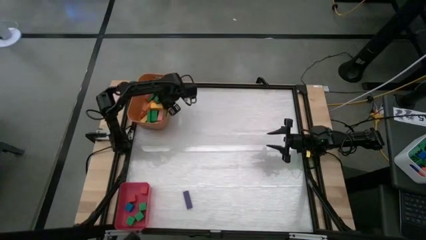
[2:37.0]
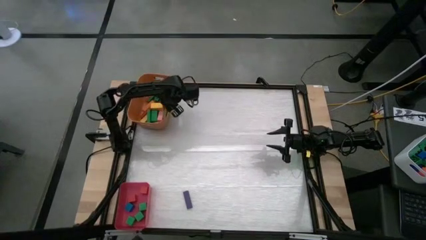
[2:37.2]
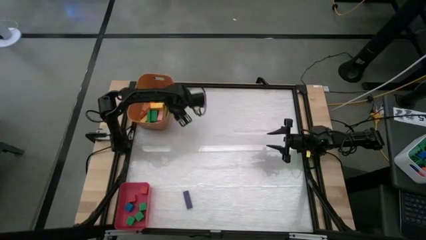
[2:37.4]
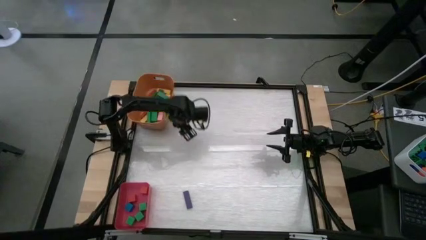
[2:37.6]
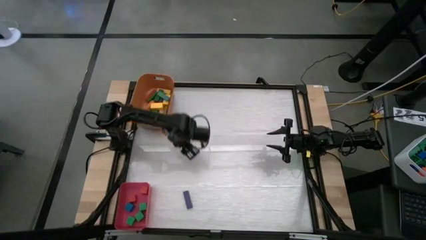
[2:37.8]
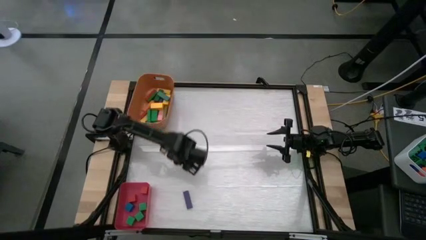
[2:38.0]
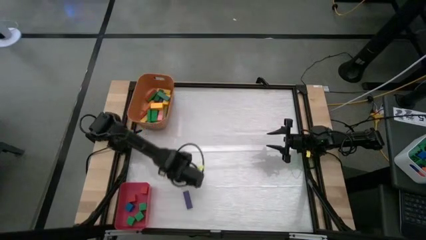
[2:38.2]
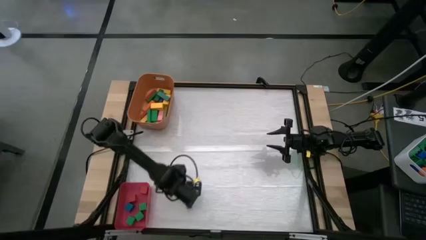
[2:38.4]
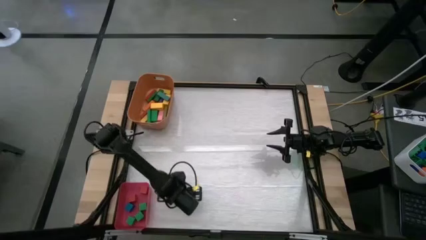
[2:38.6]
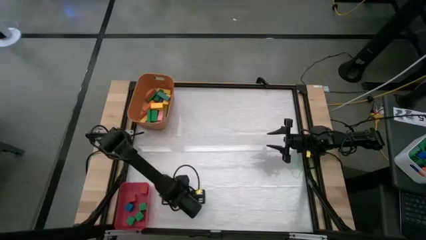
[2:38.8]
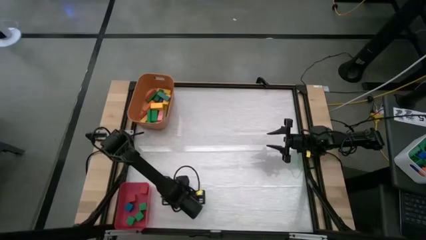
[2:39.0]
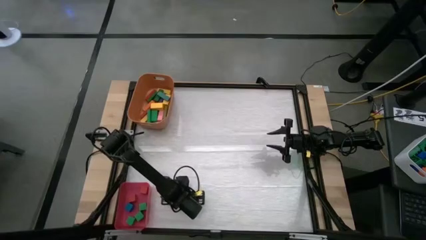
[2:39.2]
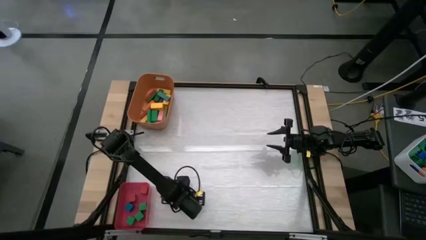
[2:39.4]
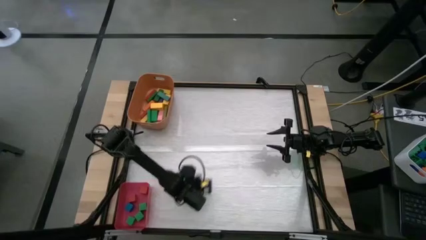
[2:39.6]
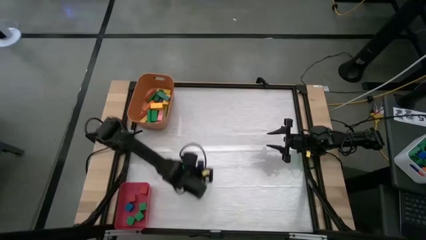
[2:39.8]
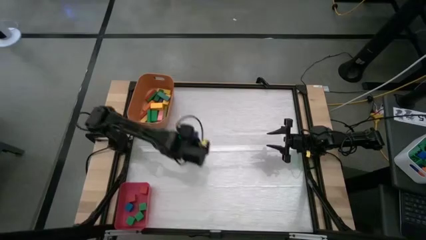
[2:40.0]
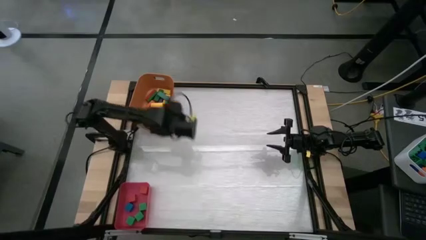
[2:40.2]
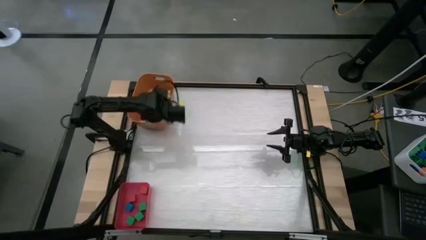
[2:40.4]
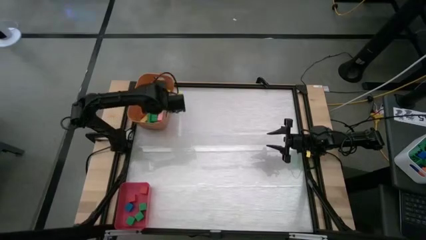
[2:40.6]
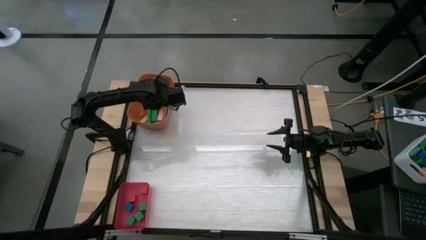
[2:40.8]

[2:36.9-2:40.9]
Task: Sort blocks by size
Put the purple block into the orange bin

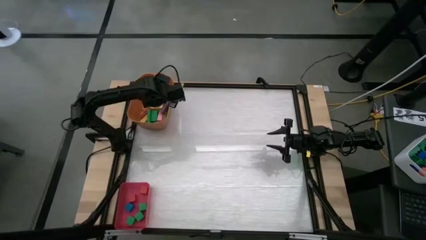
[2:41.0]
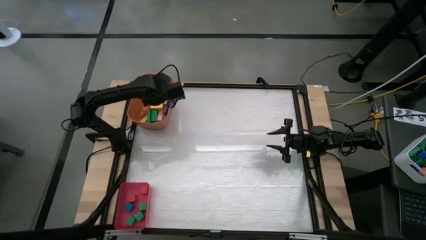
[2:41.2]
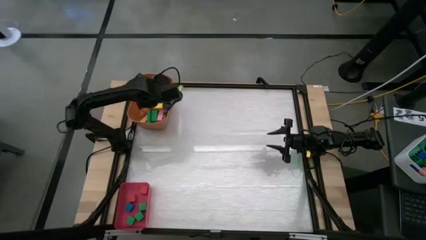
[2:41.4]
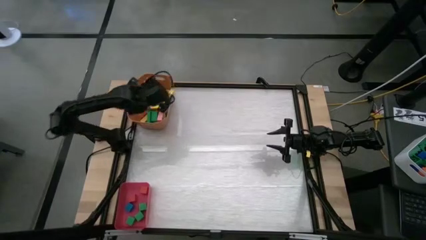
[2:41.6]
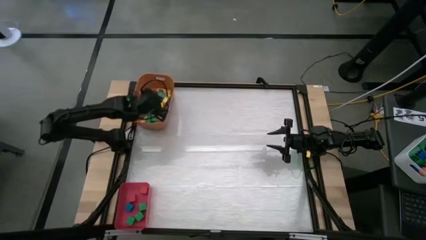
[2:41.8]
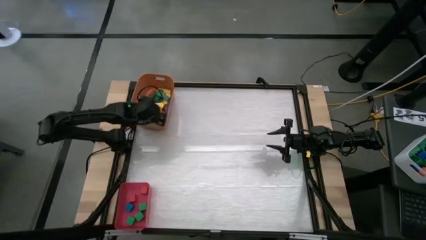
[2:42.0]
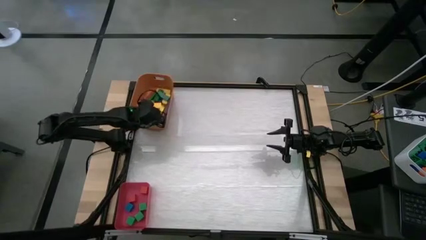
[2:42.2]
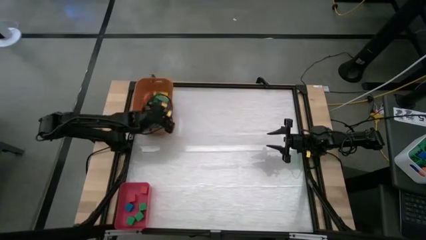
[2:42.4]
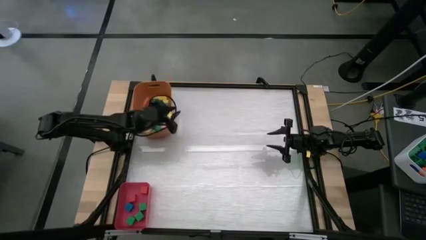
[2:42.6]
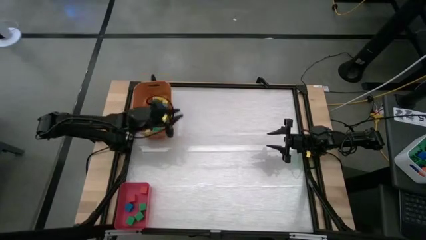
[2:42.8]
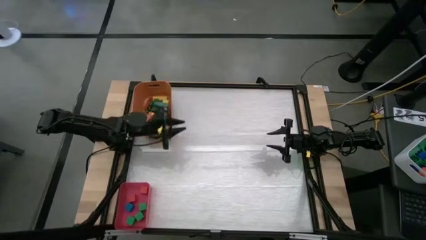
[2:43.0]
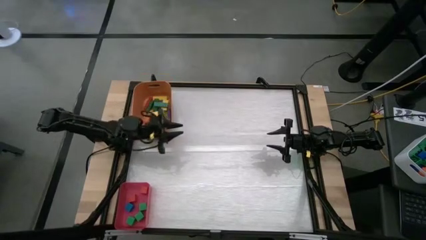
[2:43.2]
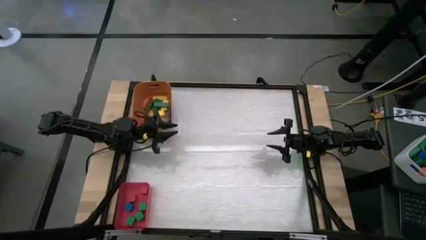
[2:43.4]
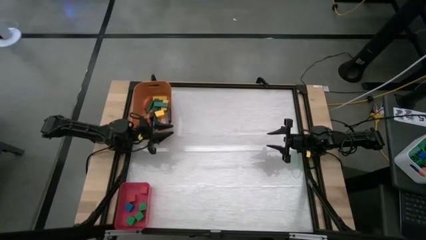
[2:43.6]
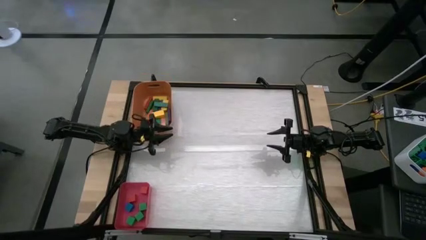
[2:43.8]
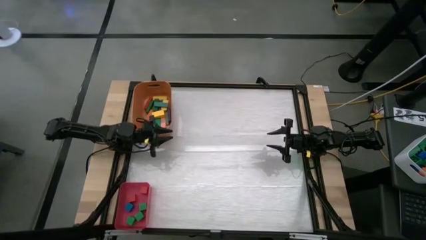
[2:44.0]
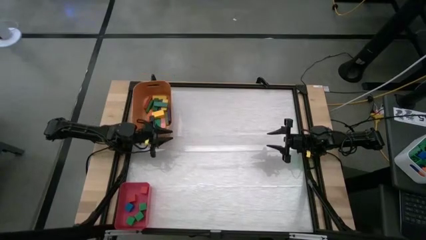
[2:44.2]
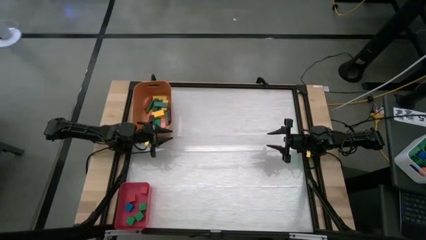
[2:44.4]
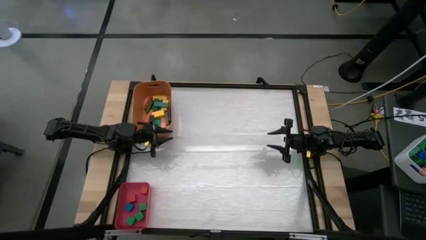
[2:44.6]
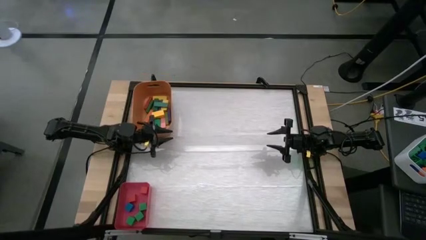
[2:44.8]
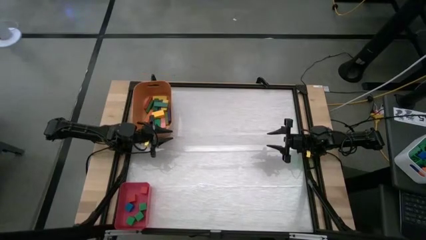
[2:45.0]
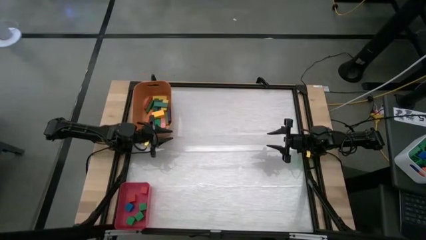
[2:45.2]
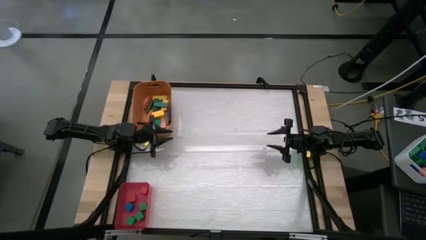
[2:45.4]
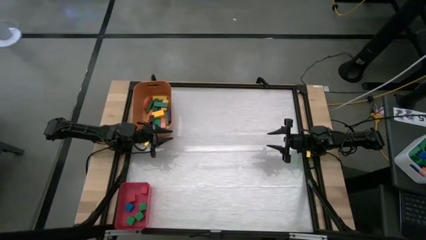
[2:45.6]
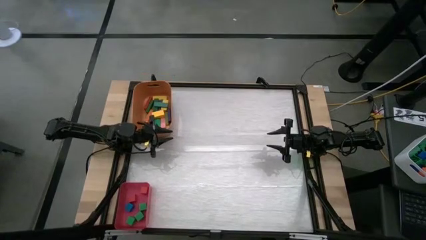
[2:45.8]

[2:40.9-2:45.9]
Return to Home Position

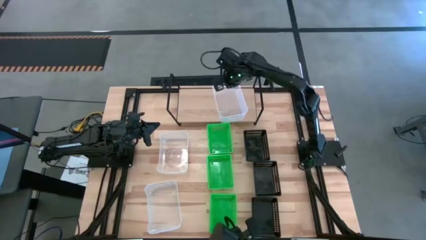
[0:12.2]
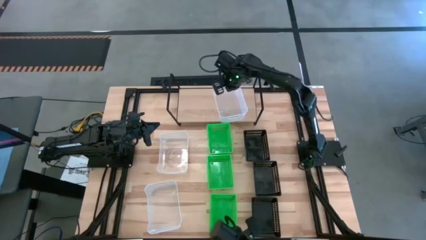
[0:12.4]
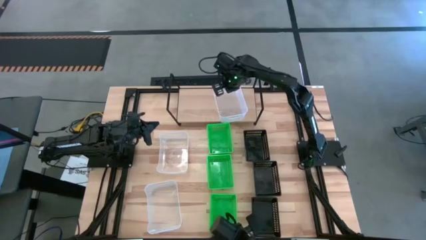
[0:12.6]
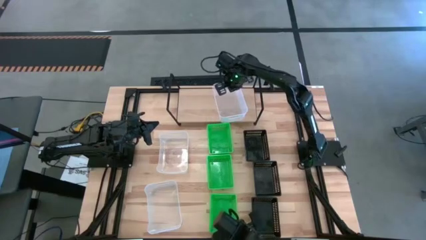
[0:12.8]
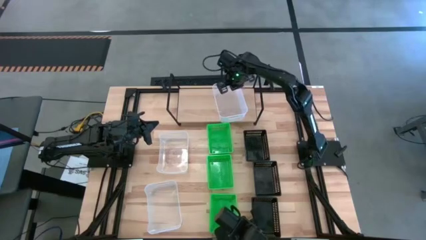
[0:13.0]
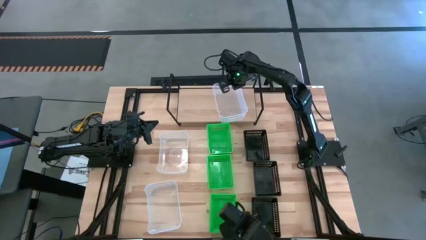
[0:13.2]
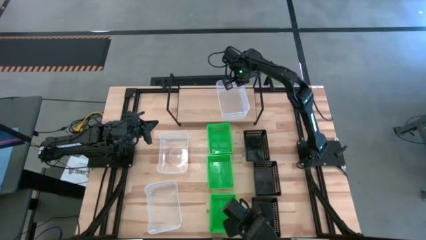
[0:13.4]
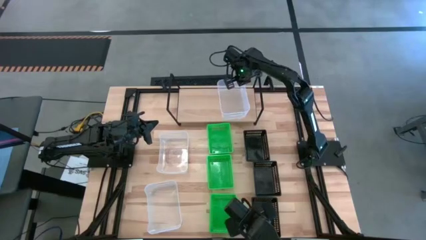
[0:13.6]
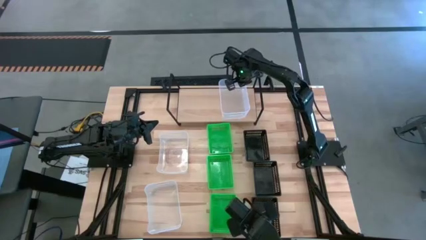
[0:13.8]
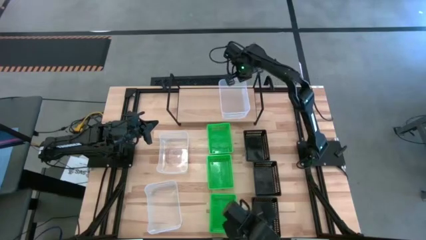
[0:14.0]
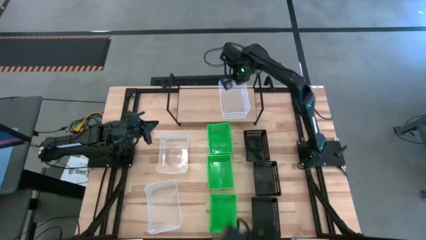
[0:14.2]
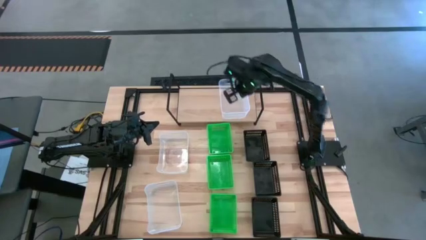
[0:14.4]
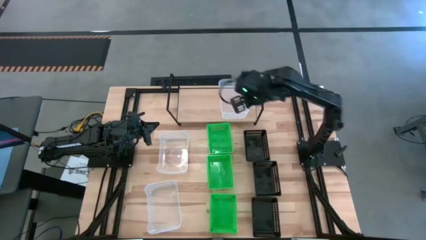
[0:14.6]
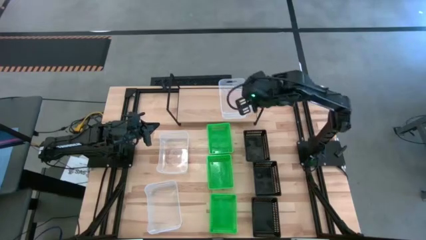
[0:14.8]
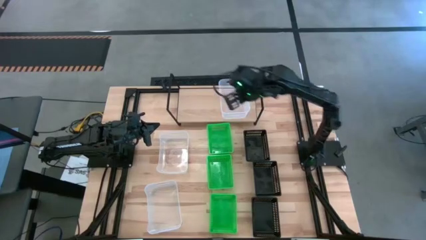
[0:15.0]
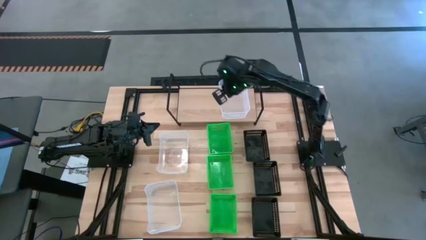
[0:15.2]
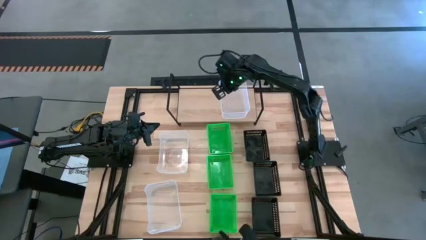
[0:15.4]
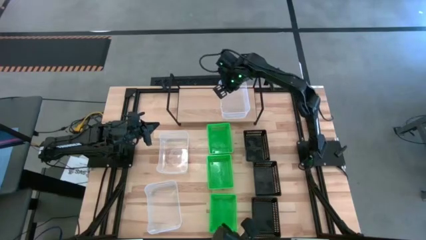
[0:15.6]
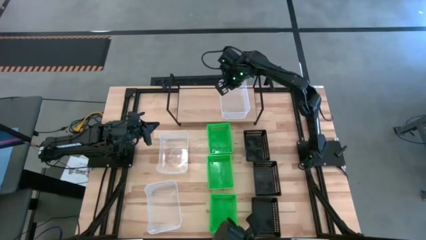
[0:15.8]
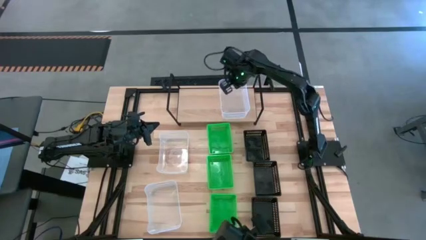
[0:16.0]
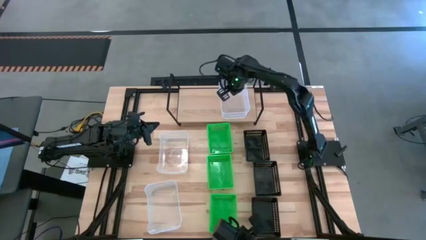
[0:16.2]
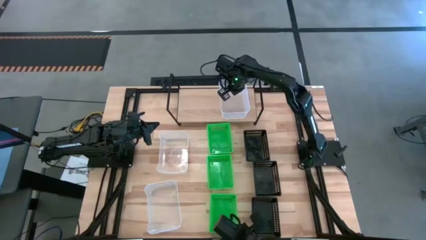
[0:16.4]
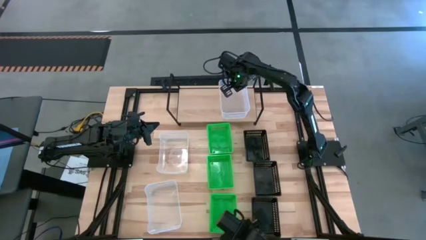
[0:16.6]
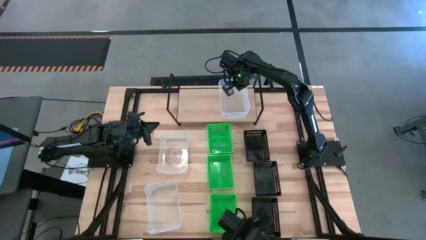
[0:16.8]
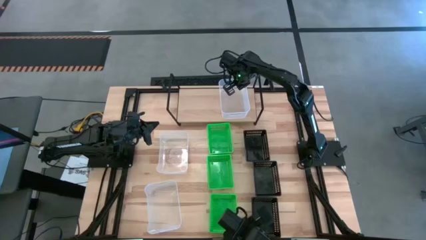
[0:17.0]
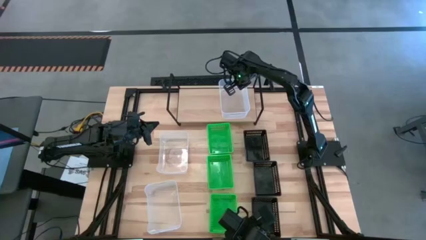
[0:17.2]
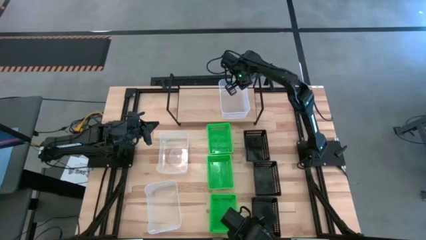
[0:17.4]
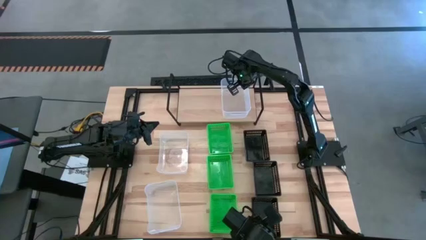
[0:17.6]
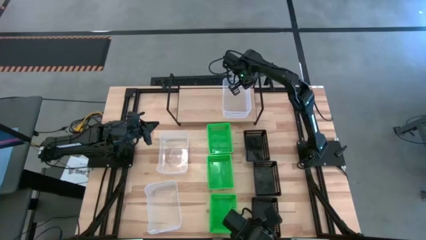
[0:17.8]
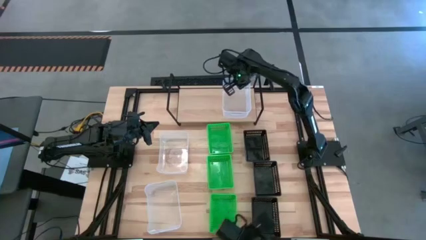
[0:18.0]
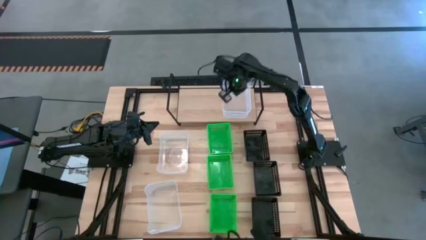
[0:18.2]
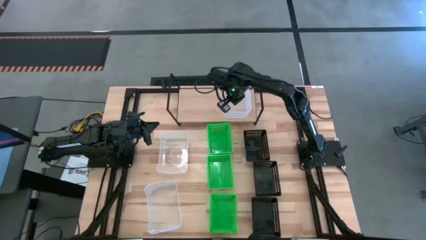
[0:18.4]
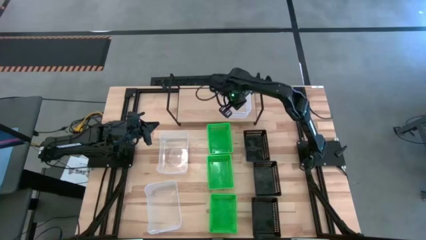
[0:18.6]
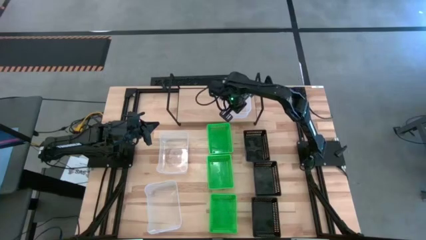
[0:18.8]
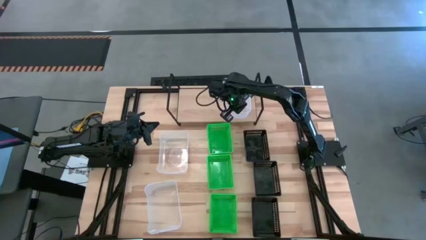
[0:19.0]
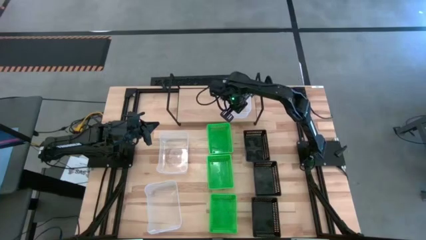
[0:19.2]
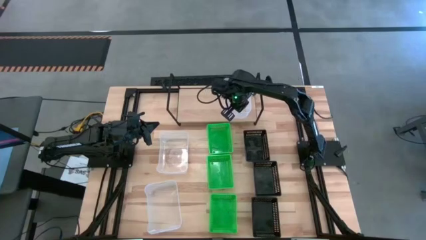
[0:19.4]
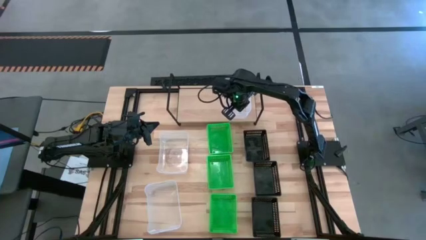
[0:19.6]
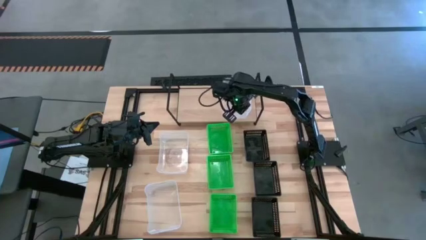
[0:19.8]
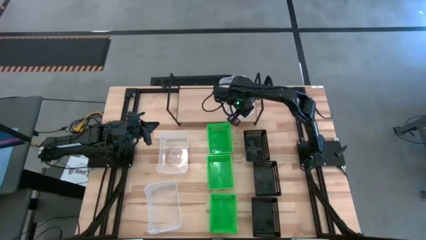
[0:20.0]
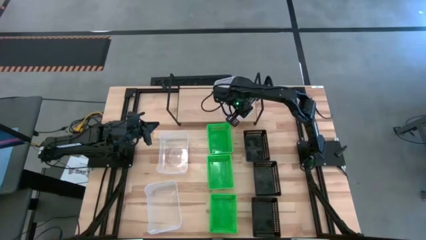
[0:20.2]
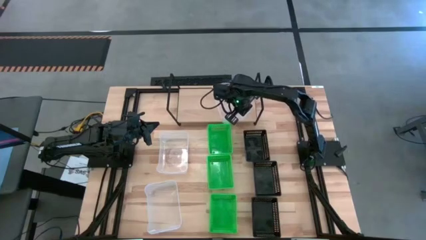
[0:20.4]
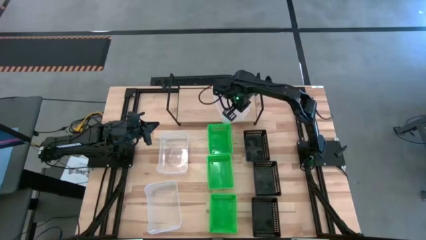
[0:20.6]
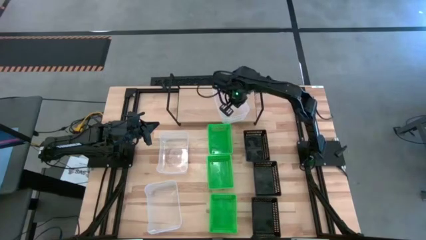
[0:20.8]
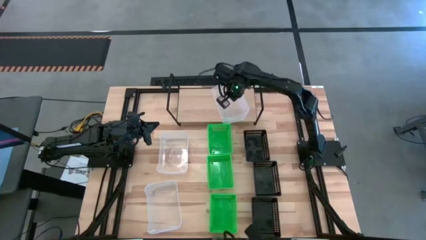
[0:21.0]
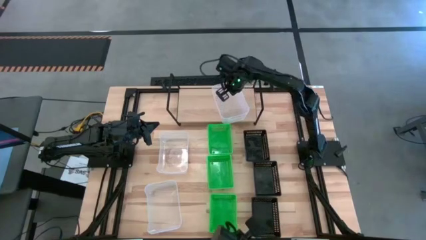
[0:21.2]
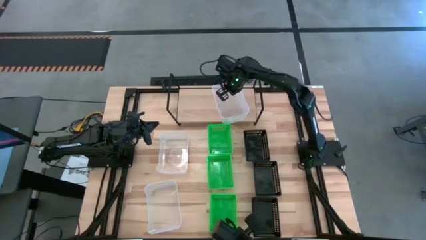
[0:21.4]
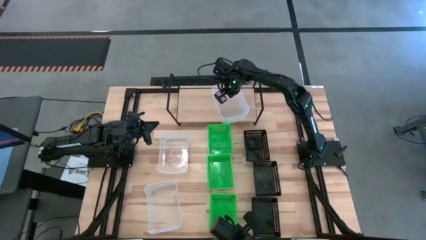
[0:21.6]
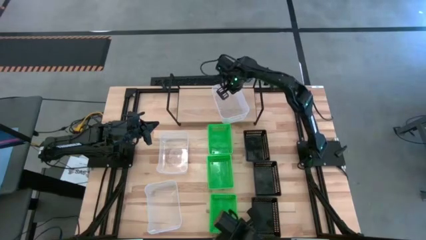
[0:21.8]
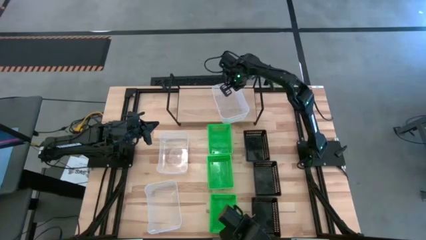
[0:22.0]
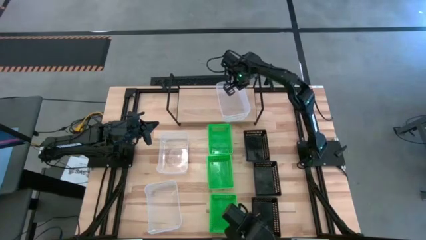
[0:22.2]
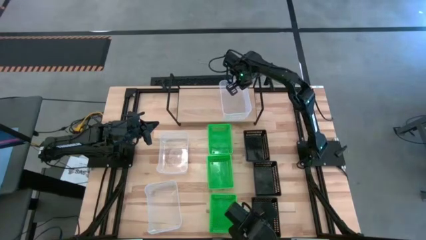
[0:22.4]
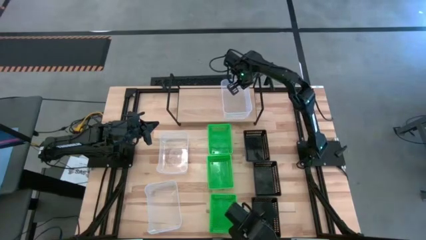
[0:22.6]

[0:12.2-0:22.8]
Task: Stack baskets on shelf by color
Put the top right transparent bin on the shelf
